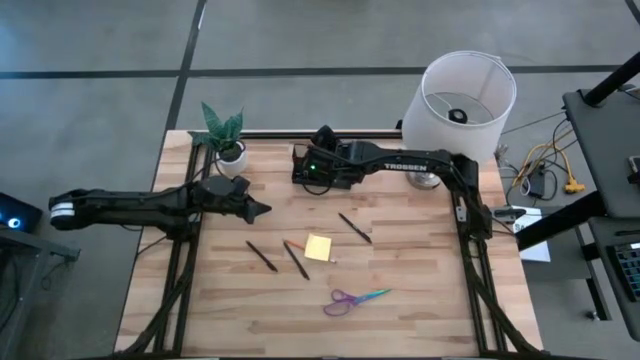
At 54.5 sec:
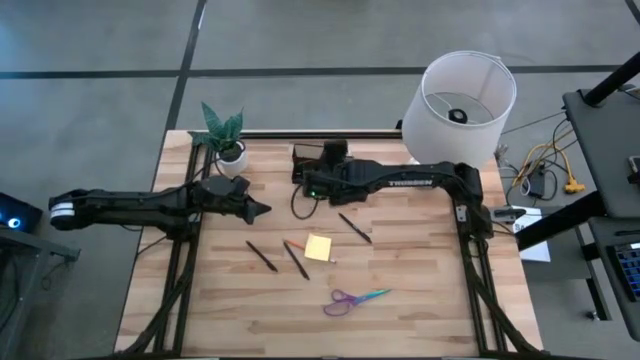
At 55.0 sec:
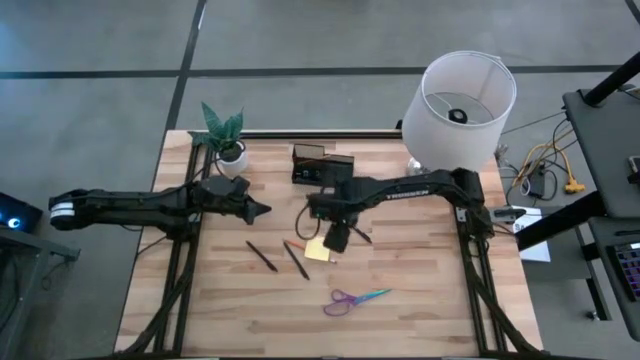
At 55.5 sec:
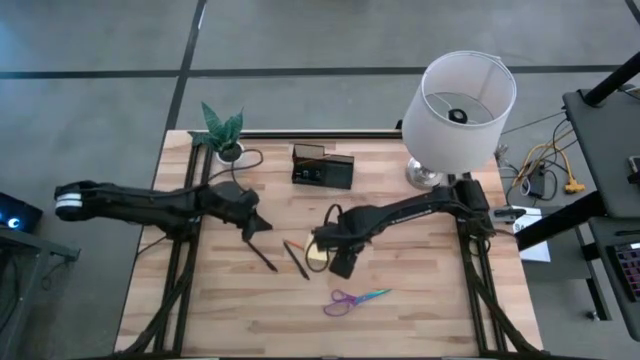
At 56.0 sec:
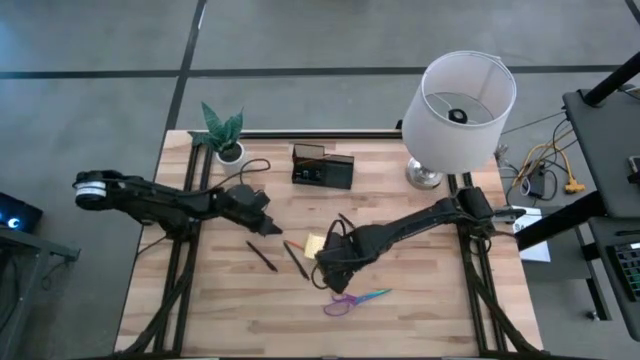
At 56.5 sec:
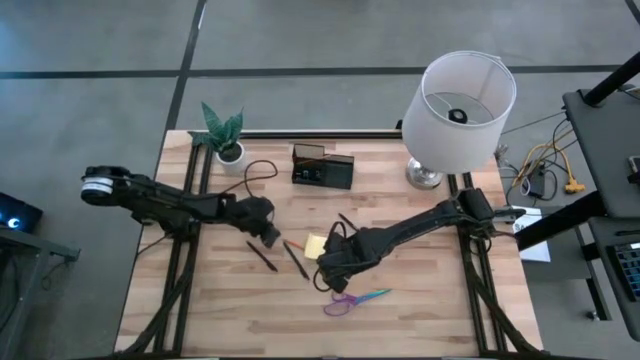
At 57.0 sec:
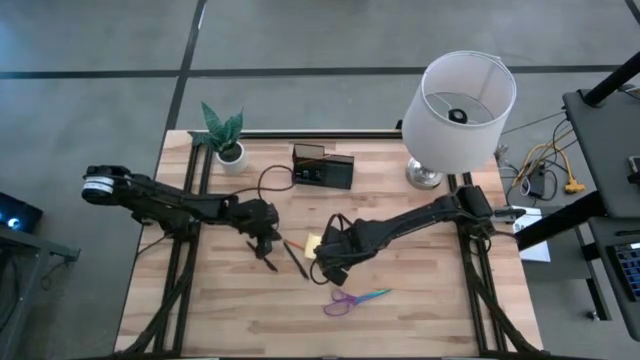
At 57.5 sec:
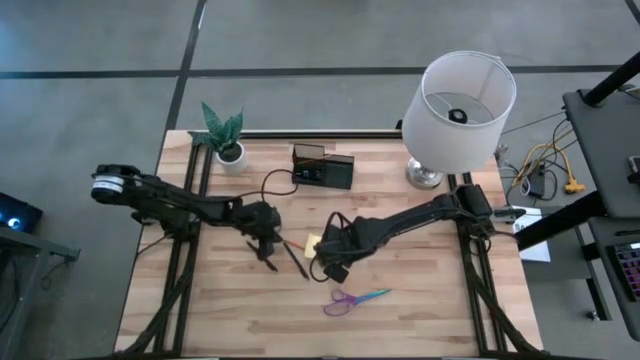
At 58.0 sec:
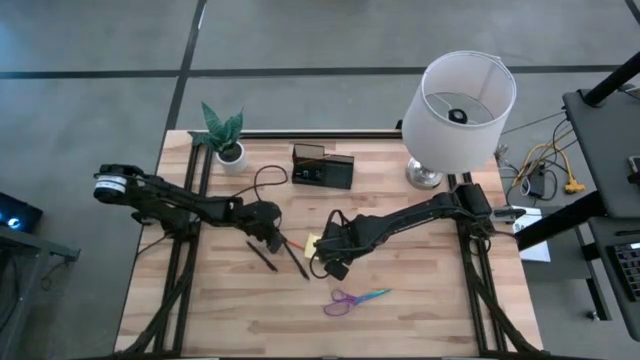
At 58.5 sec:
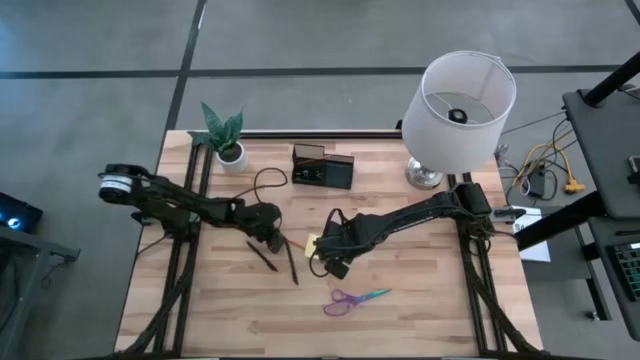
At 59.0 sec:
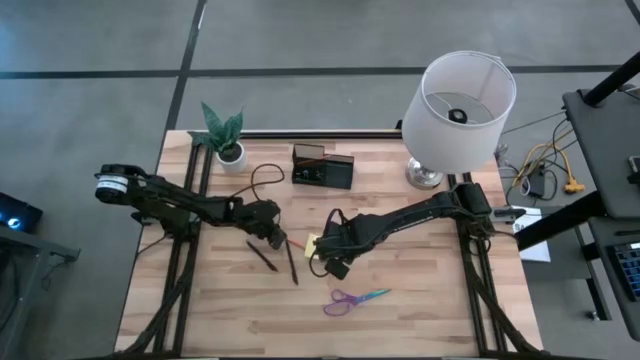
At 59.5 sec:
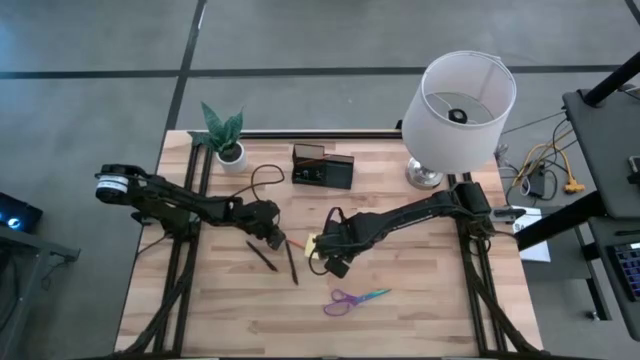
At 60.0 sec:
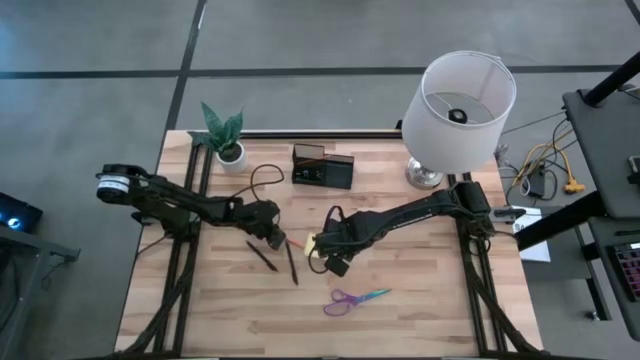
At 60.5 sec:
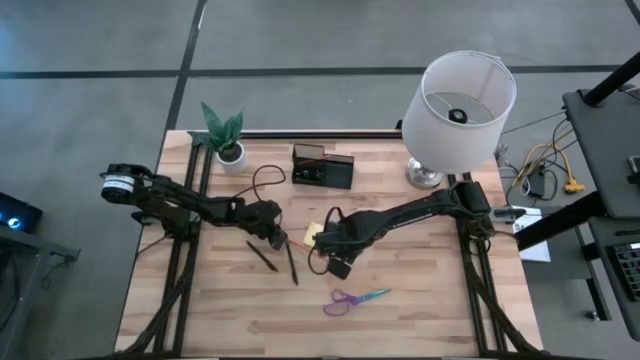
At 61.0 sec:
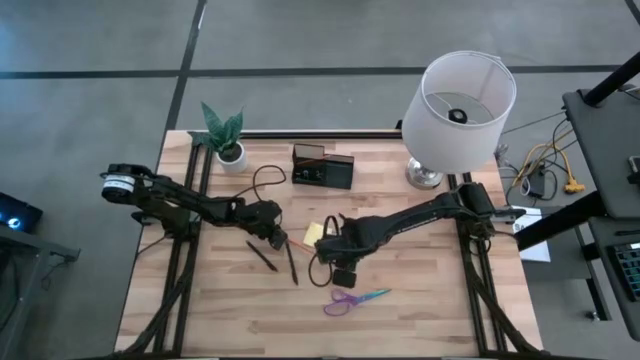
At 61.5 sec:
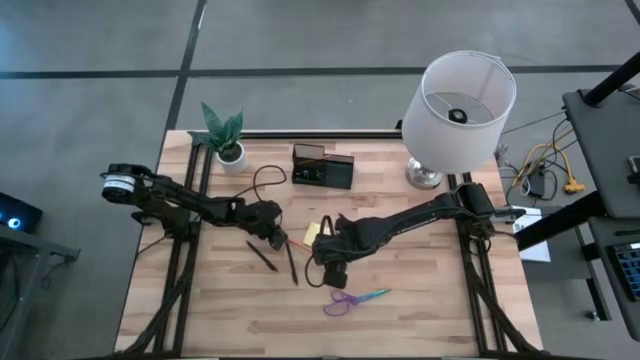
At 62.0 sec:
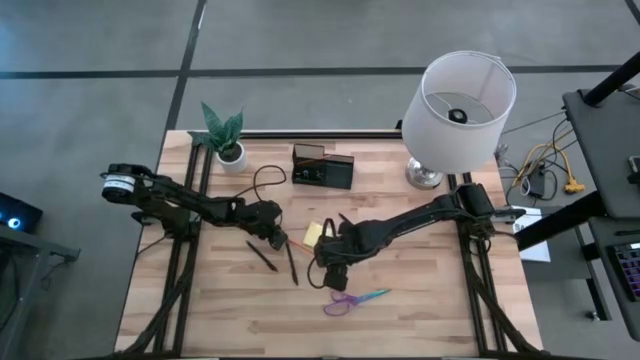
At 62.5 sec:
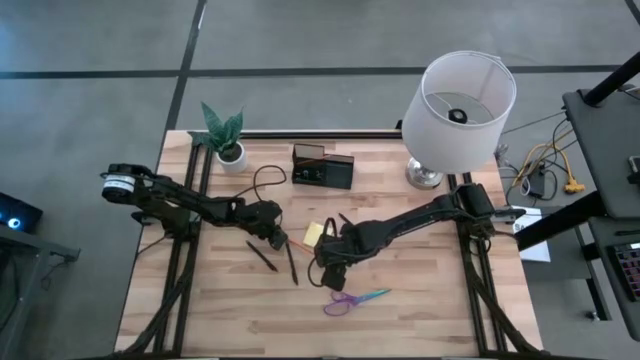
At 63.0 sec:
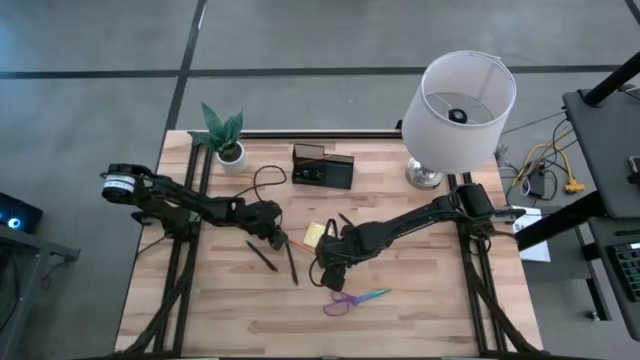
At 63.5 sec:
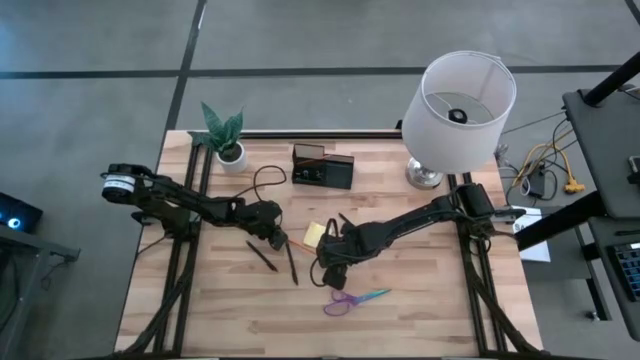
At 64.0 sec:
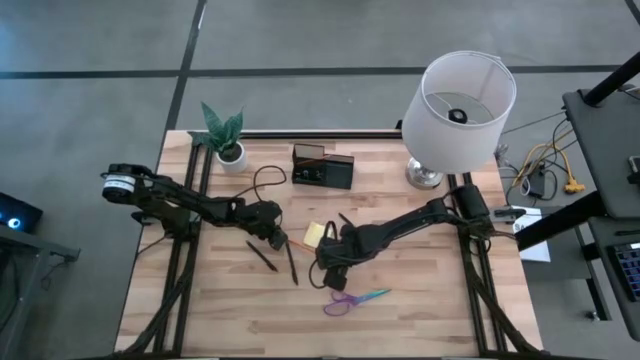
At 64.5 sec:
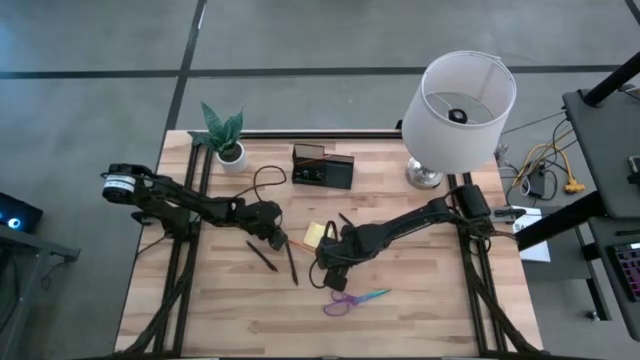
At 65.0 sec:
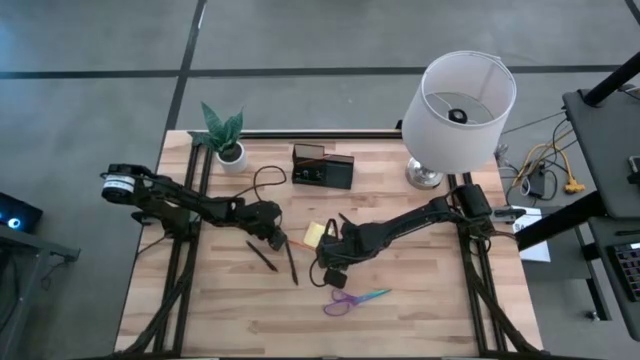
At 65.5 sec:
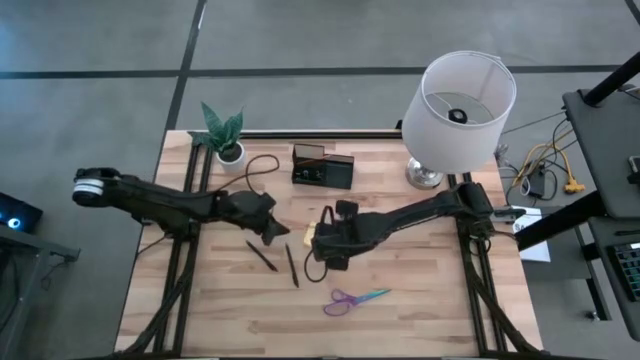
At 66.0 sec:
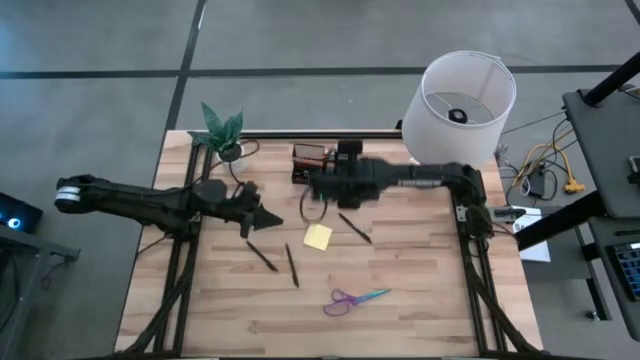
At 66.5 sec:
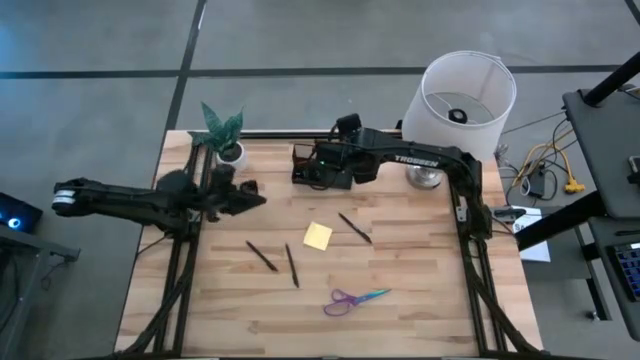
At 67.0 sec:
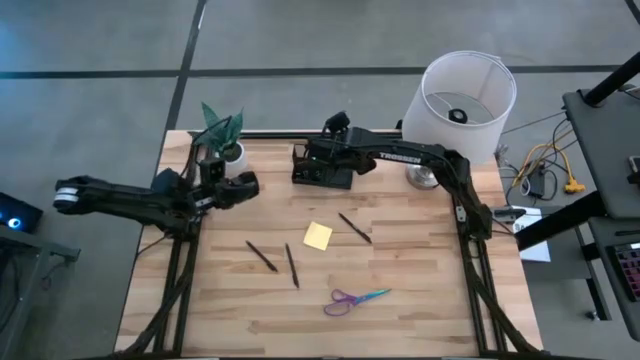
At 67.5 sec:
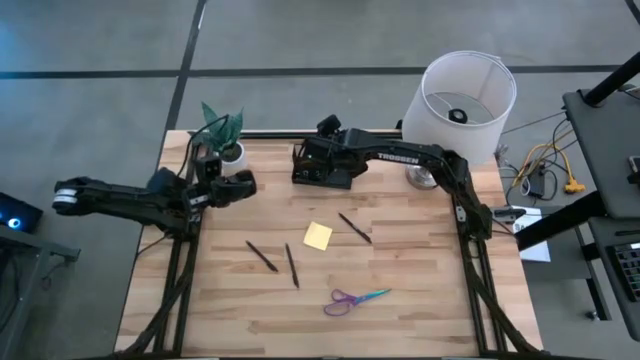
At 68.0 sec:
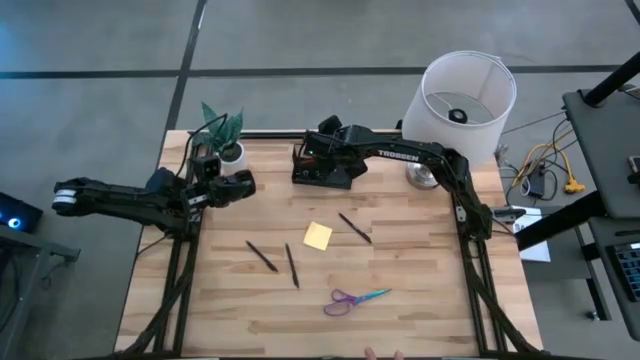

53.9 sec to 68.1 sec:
Task: Pick and place office supplies into organizer
Put the yellow pencil into the black desk organizer

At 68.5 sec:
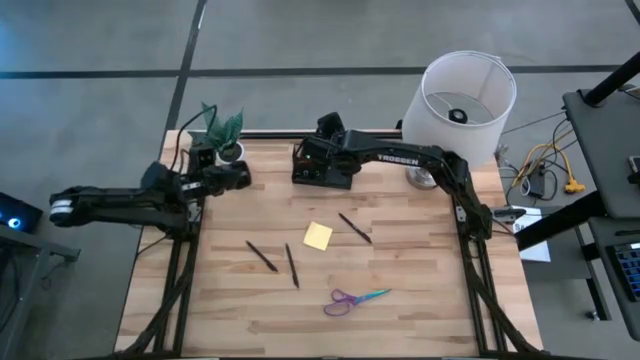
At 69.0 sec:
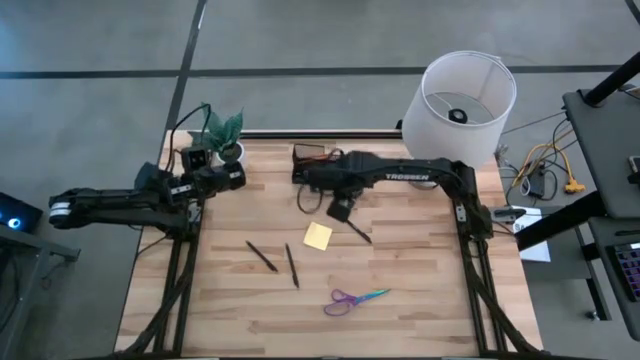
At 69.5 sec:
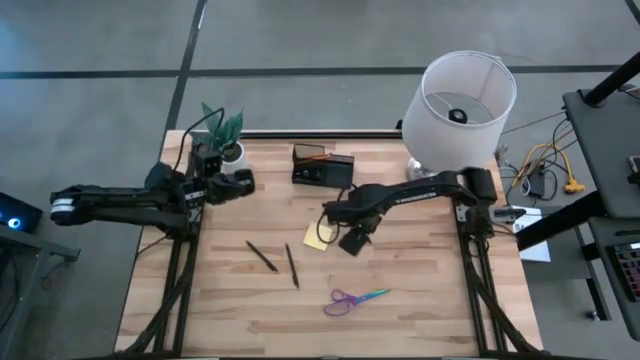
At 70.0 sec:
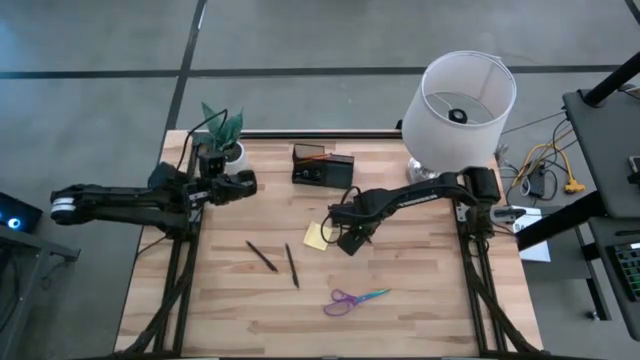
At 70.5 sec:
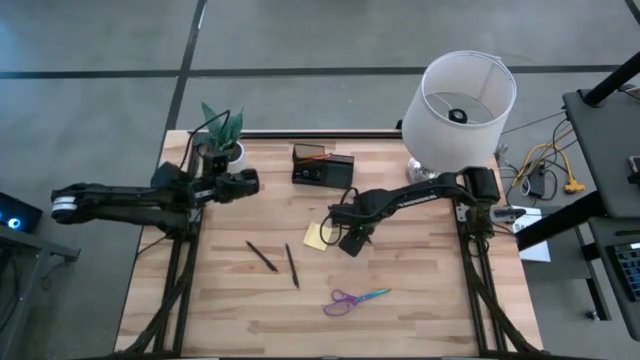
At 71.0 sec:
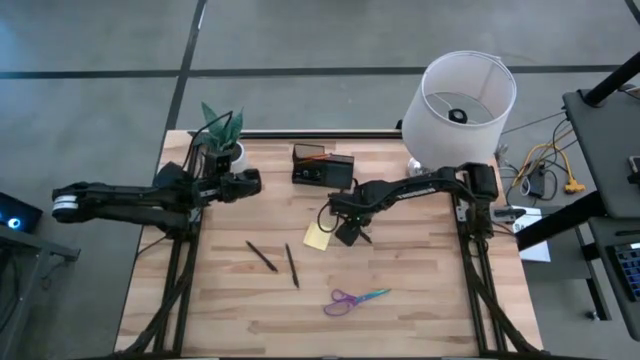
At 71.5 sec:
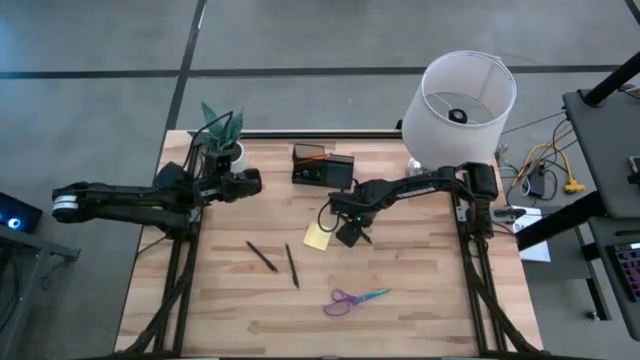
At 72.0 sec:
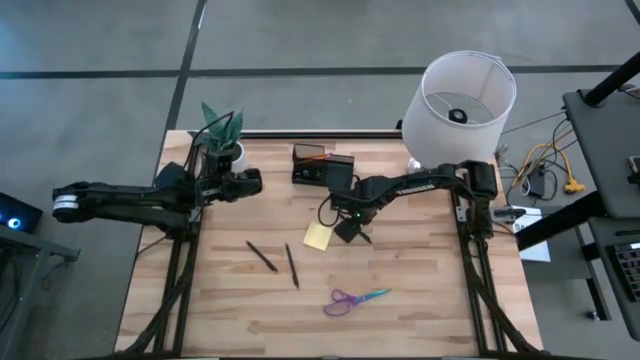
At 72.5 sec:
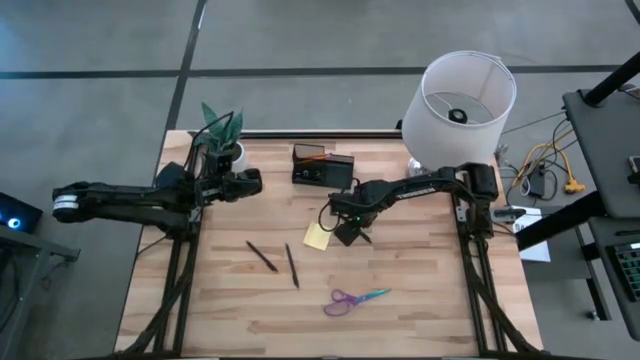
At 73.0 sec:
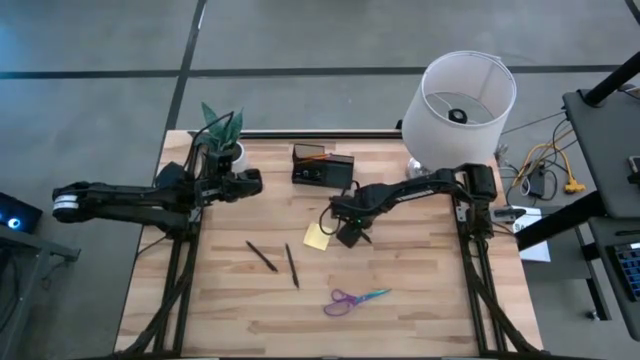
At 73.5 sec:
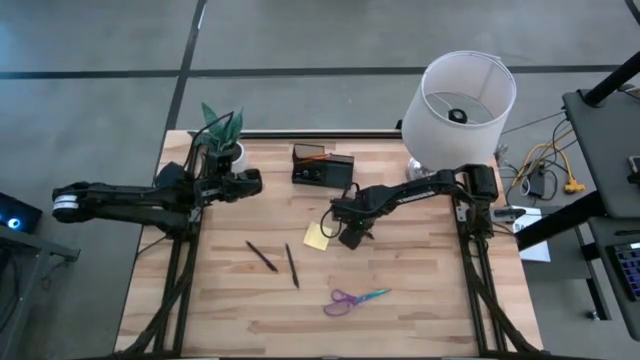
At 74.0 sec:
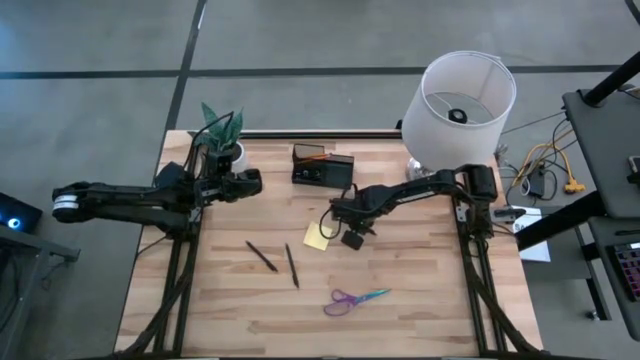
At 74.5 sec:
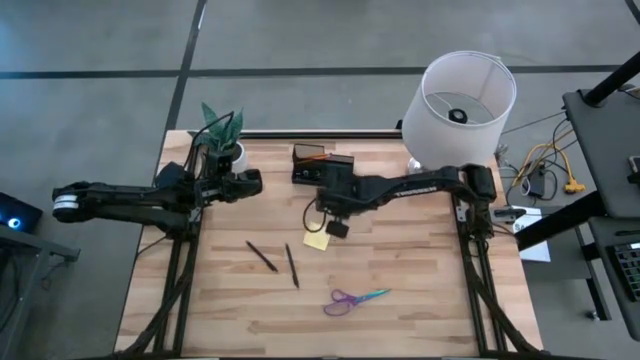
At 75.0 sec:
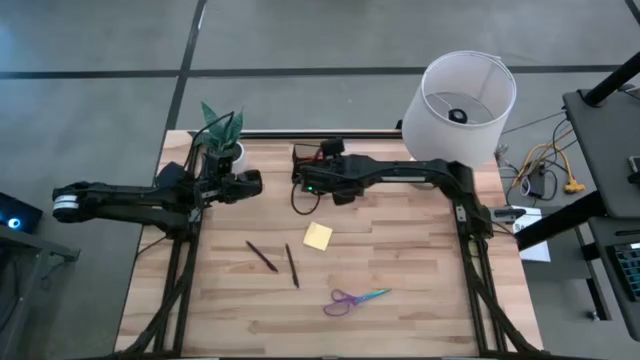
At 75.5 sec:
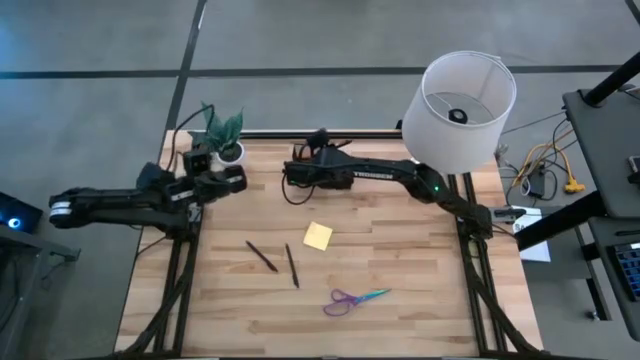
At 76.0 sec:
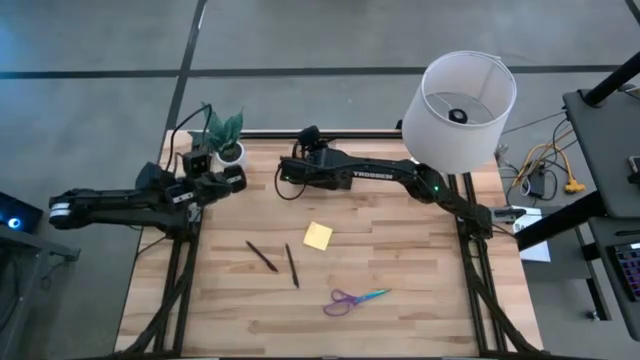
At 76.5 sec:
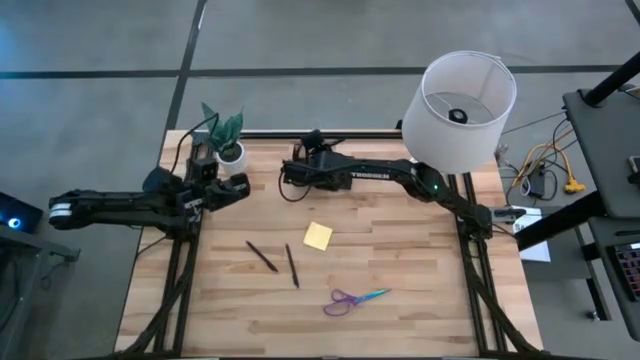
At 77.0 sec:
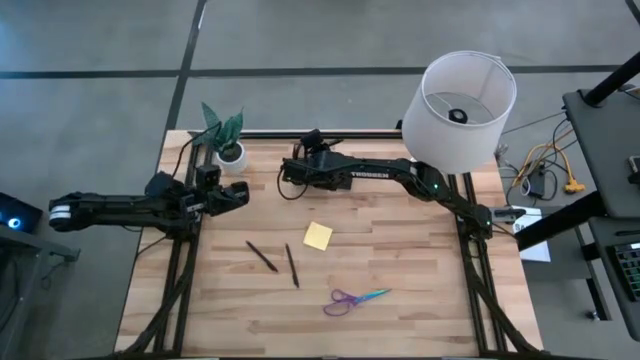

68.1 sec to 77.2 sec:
Put the top right black pen into the black desk organizer
